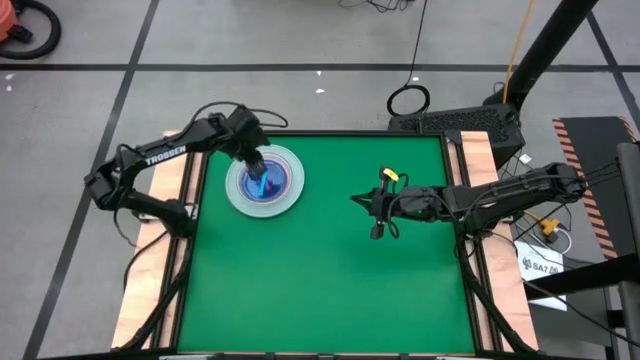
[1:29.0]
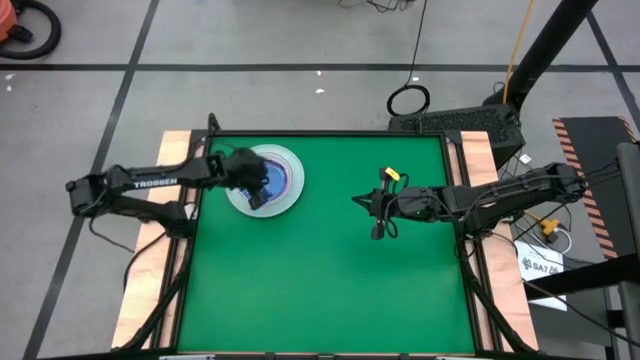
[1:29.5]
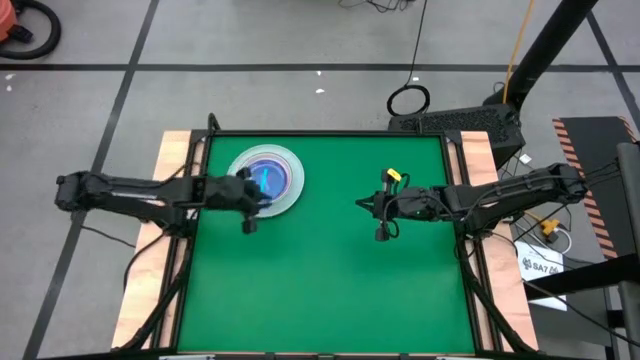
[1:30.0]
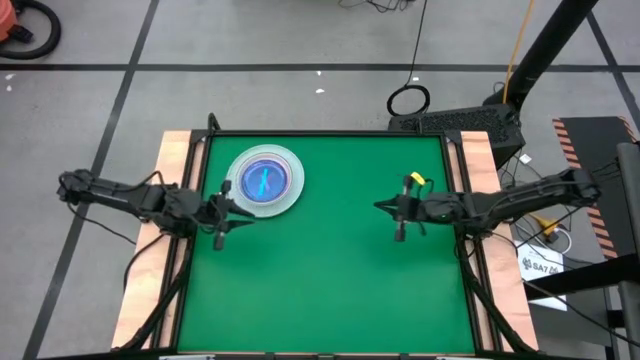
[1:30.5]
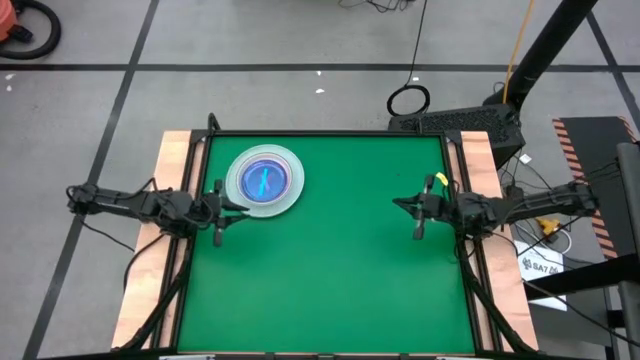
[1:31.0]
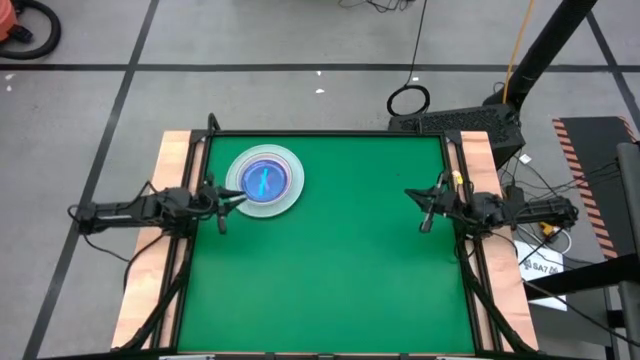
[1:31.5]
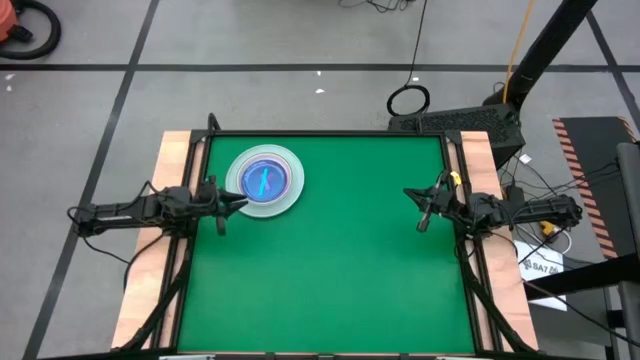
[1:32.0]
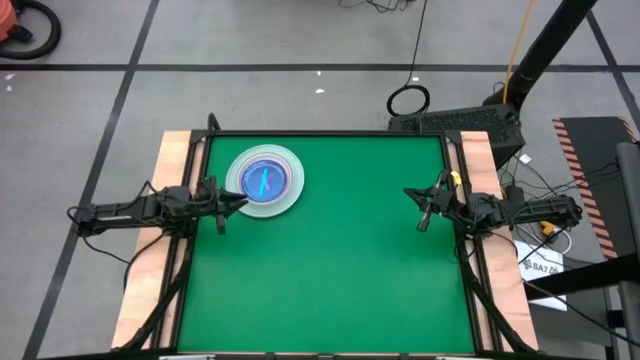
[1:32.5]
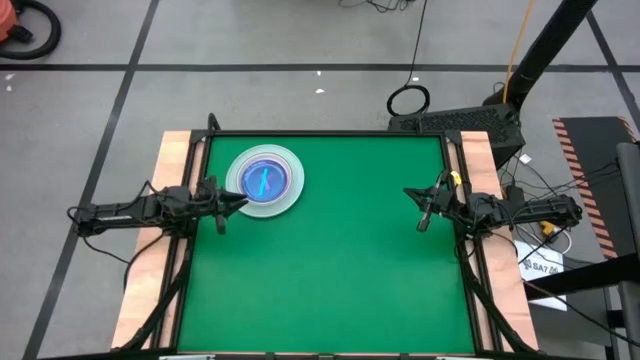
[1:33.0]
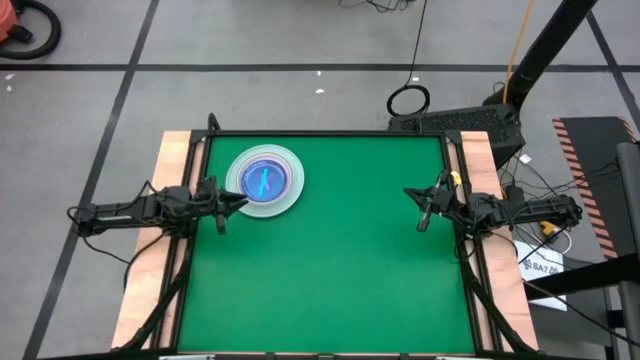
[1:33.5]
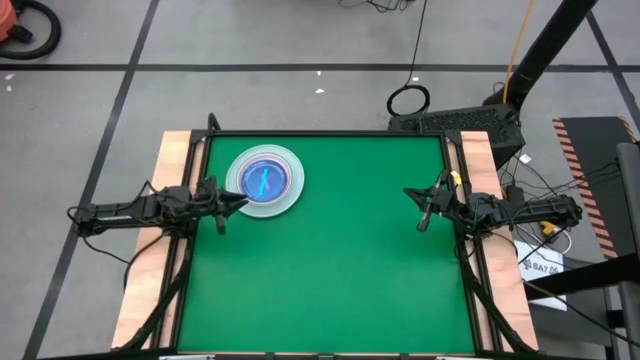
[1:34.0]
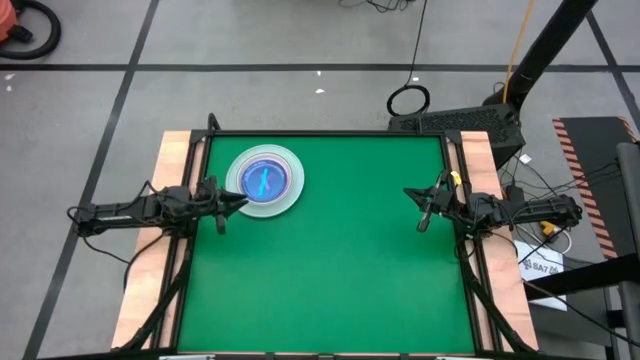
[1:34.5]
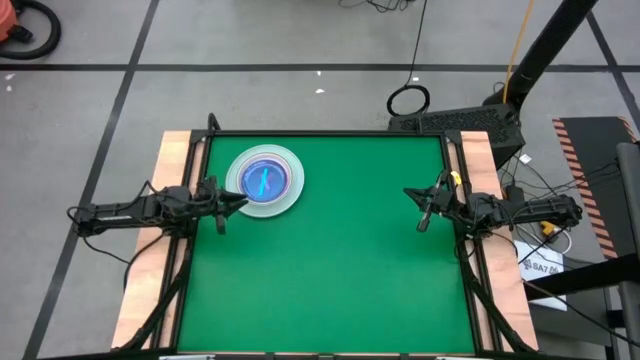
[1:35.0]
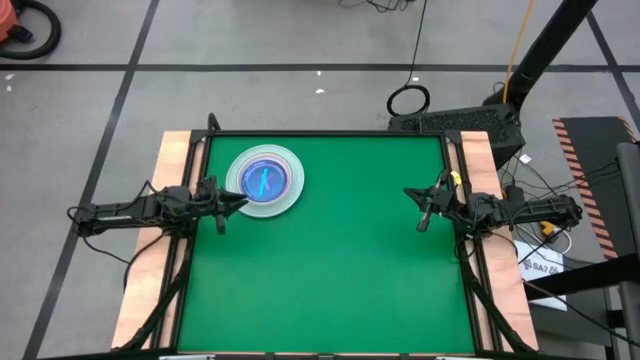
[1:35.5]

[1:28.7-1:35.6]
Task: Stack plastic plates
Return to Home Position

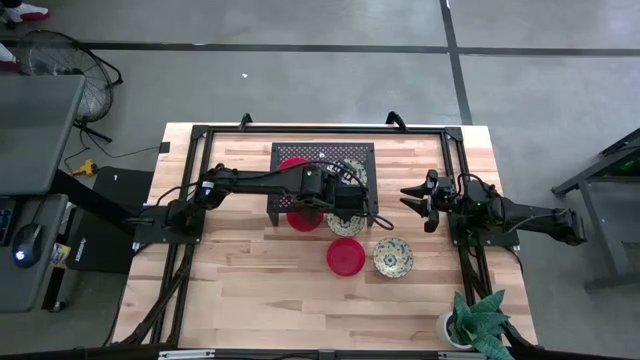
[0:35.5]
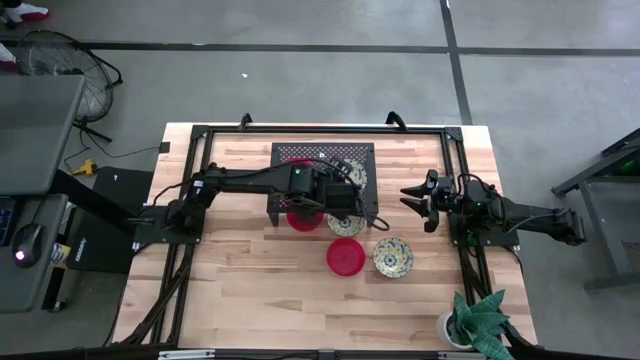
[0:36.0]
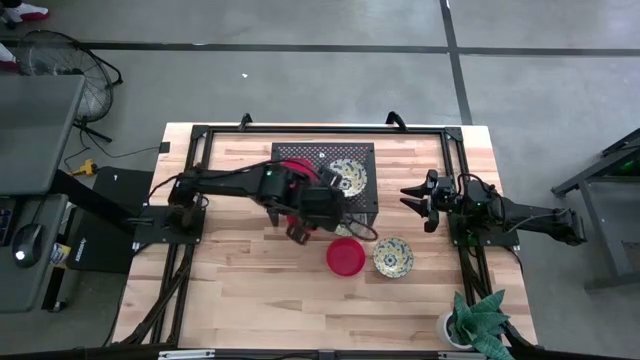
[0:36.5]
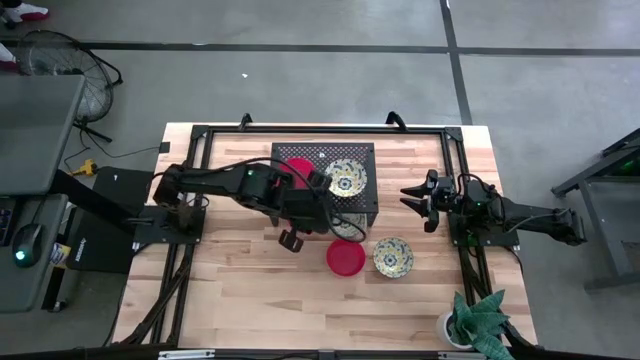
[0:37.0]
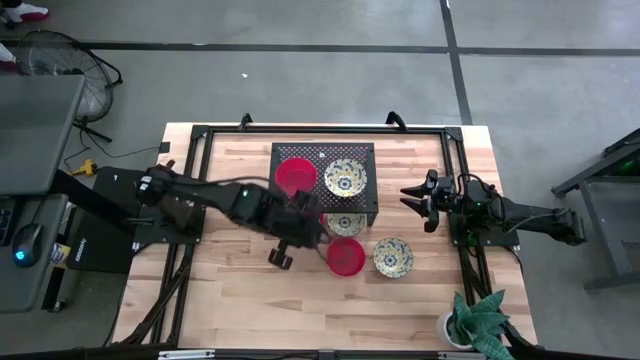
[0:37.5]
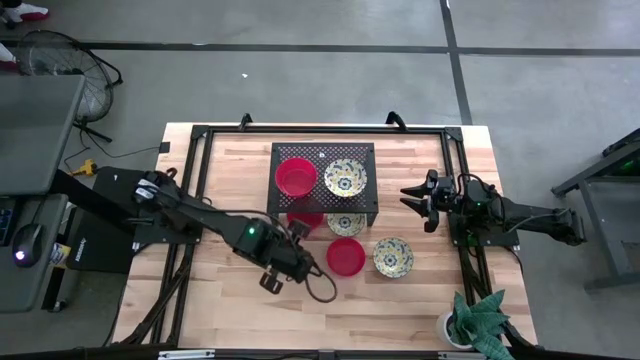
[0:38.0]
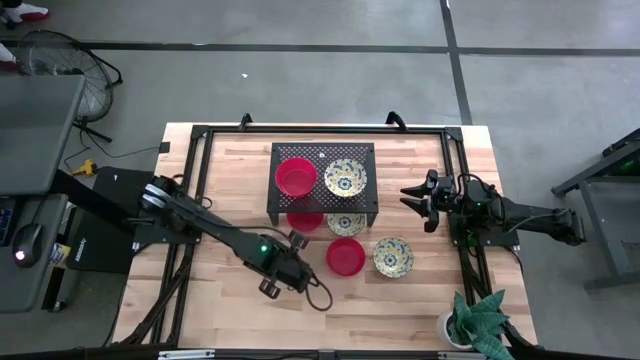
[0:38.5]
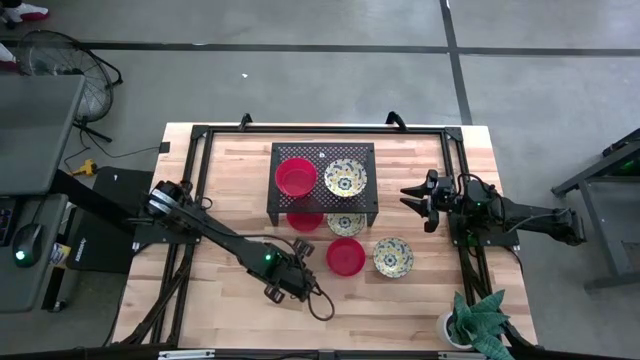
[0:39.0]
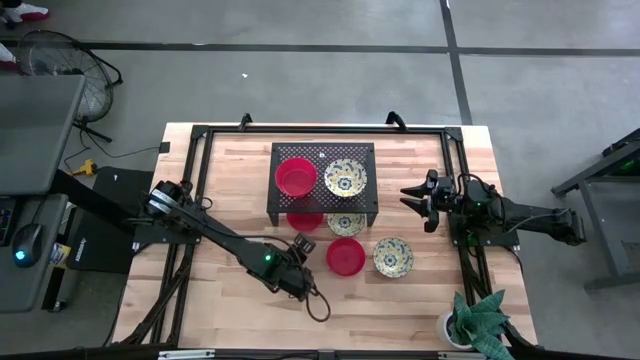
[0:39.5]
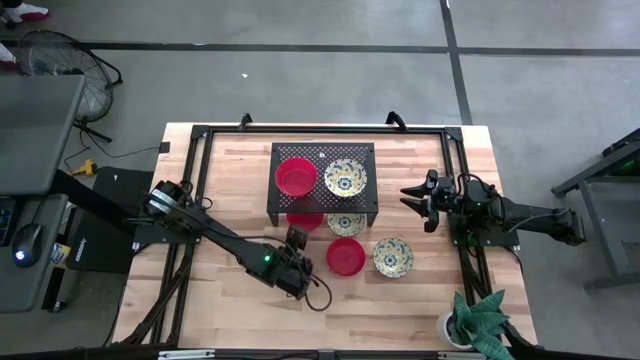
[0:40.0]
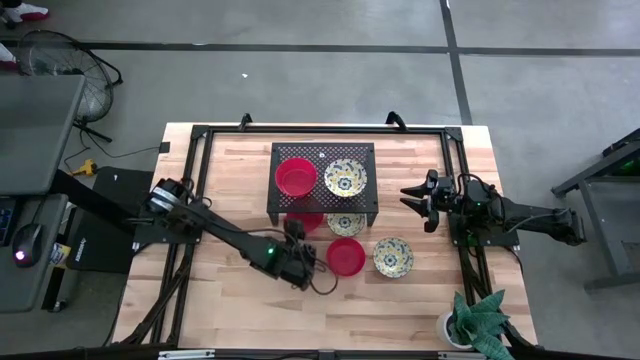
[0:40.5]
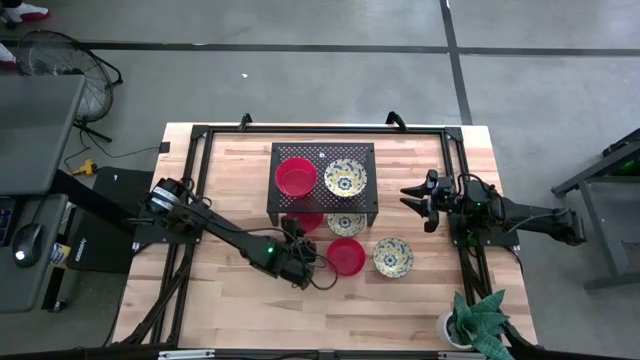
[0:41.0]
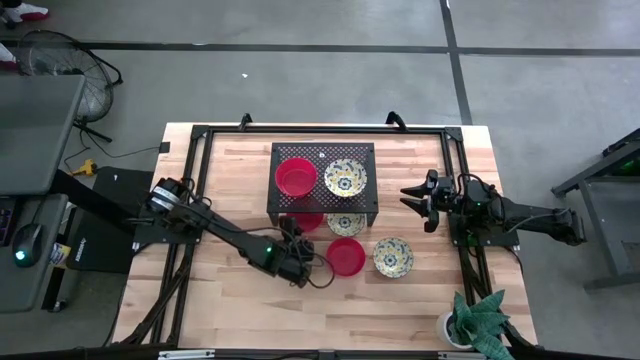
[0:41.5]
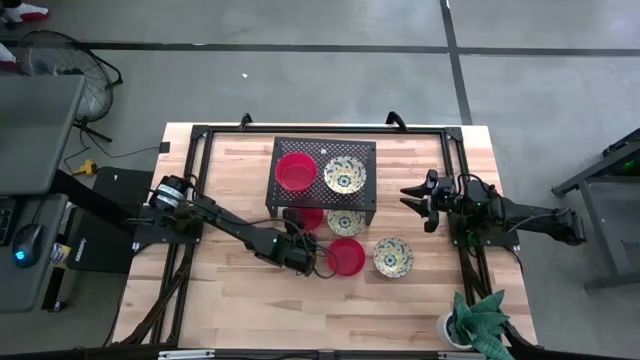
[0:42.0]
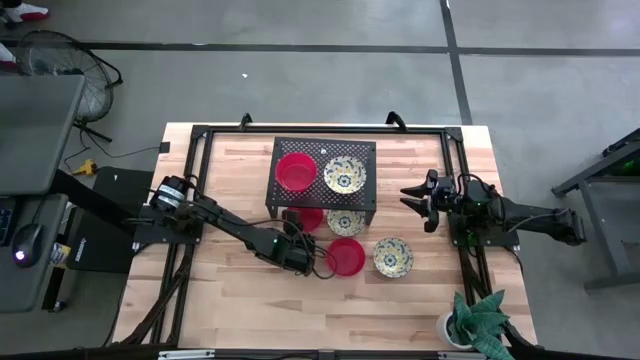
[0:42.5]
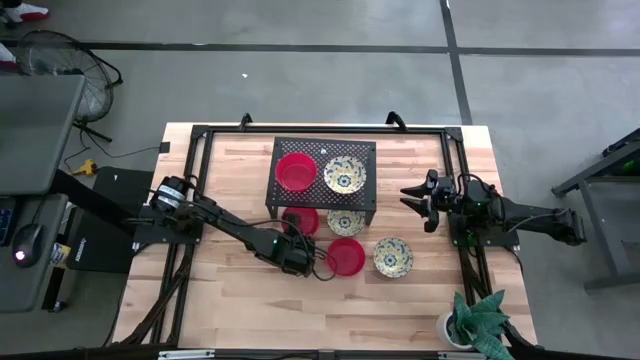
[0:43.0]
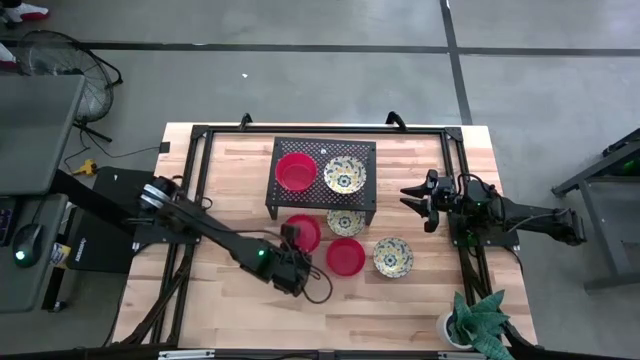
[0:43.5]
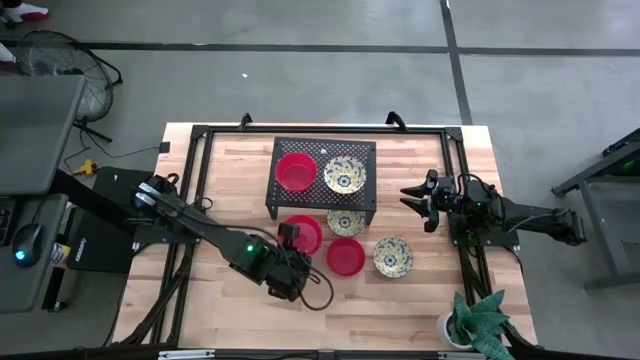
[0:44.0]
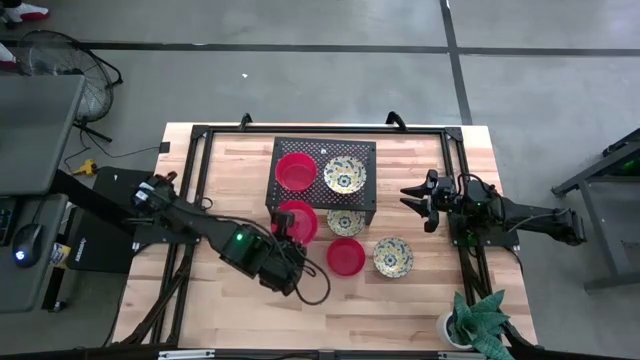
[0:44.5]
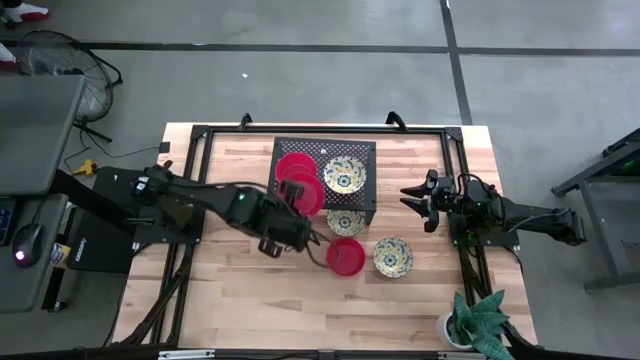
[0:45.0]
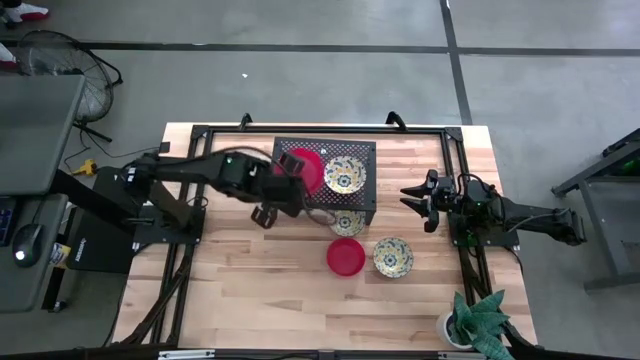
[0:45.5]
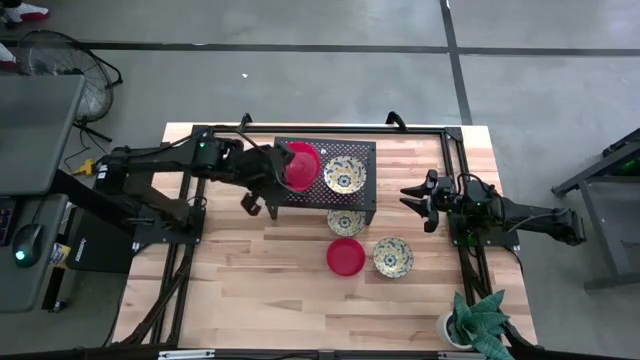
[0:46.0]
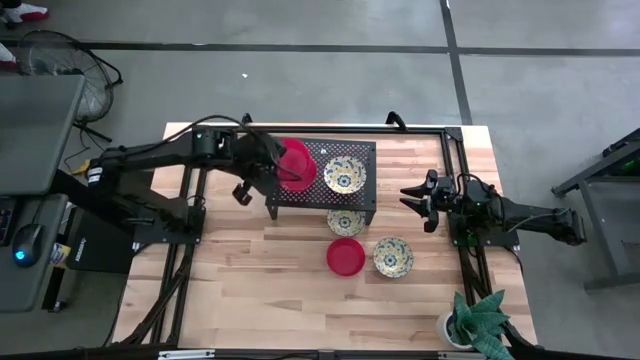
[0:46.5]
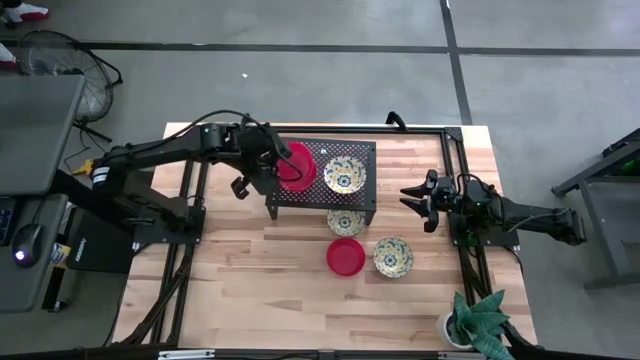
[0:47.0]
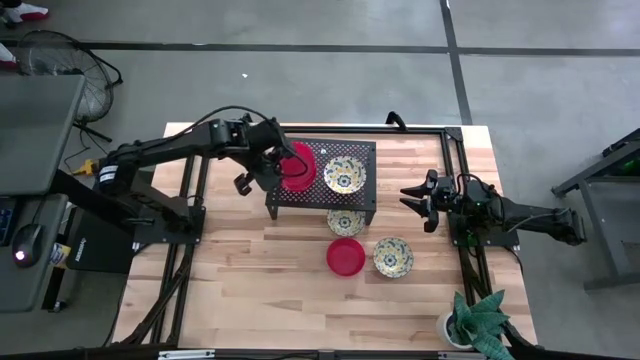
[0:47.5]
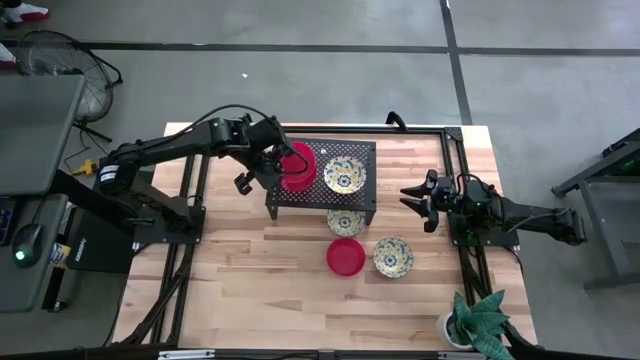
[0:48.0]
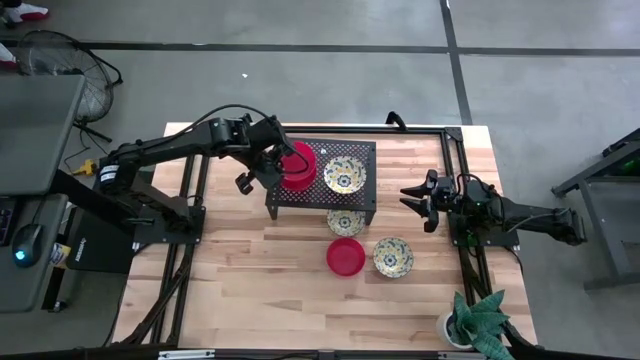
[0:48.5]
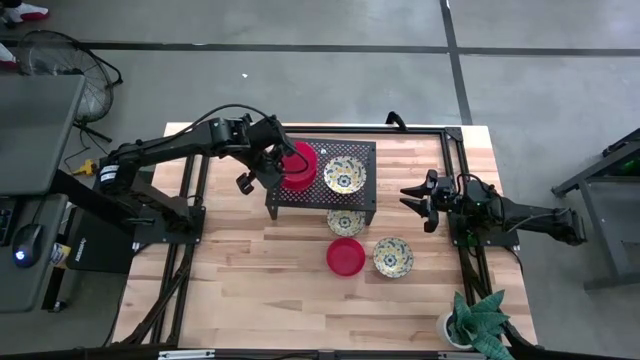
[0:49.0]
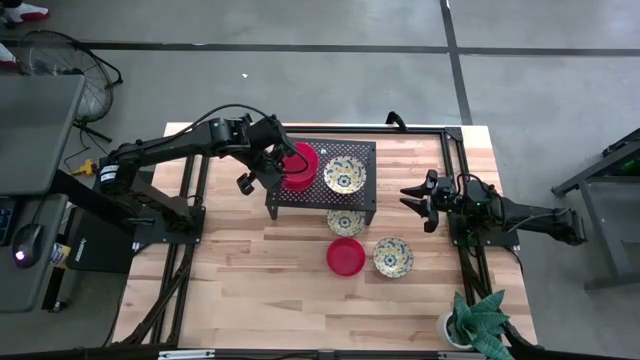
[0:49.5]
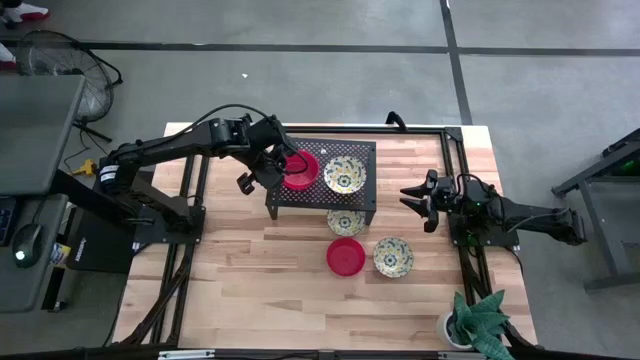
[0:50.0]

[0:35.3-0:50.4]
Task: Pick & Place Mini bowls
Stack the top red bowl on the red bowl on the shelf
